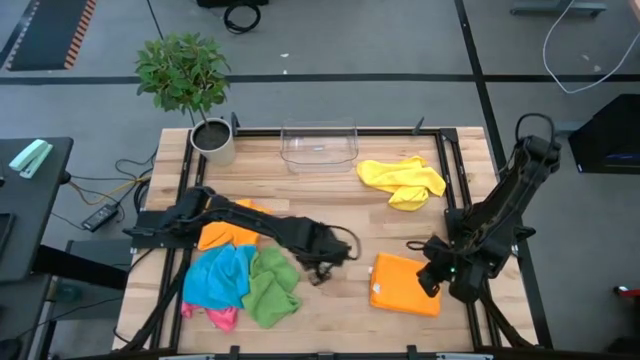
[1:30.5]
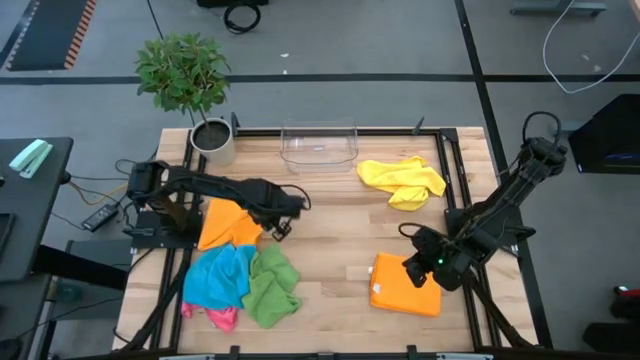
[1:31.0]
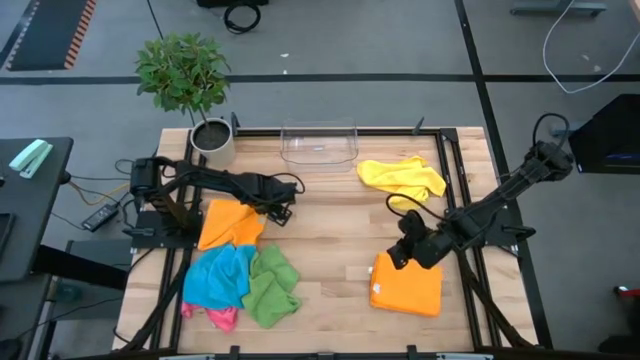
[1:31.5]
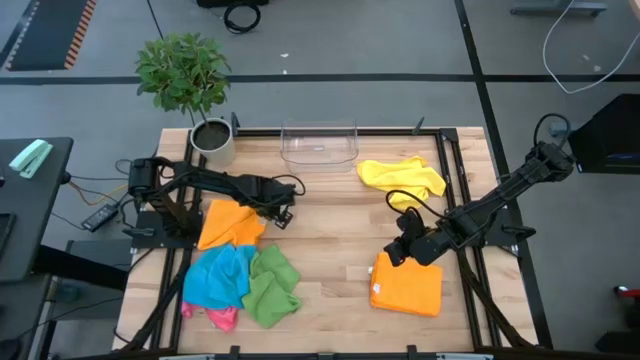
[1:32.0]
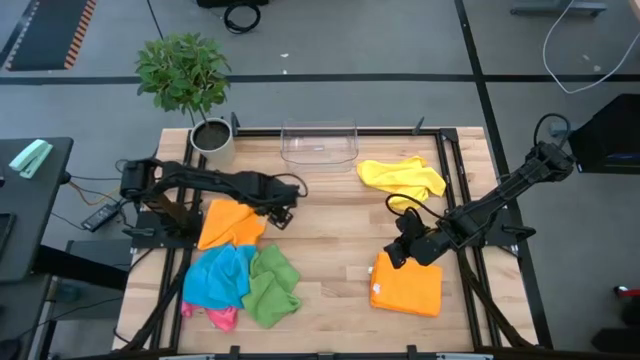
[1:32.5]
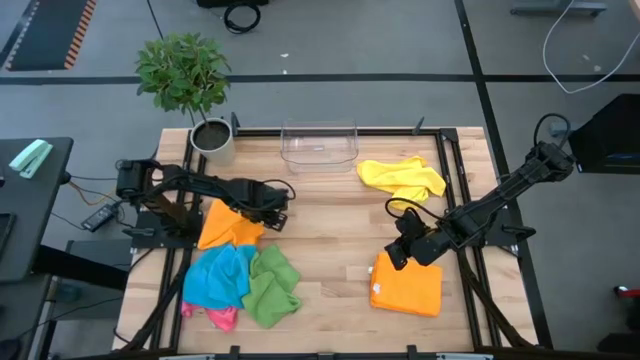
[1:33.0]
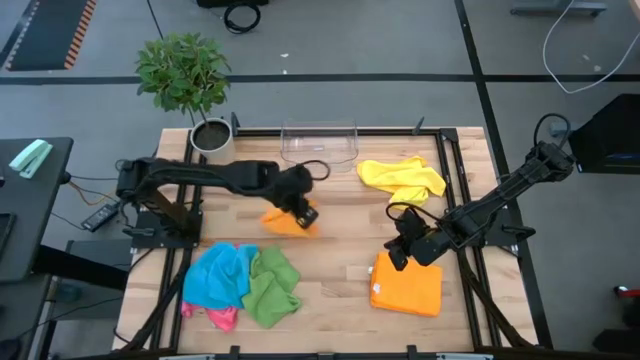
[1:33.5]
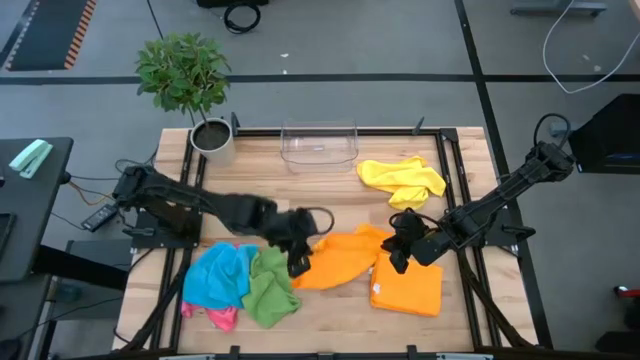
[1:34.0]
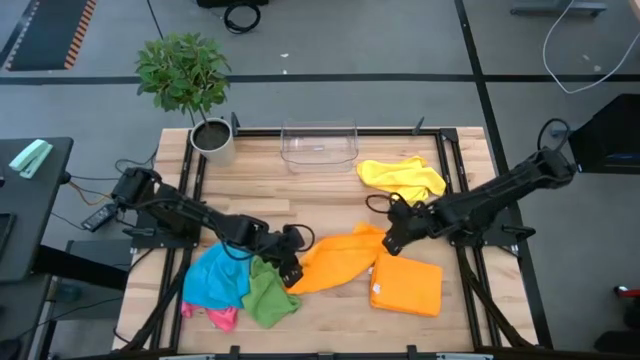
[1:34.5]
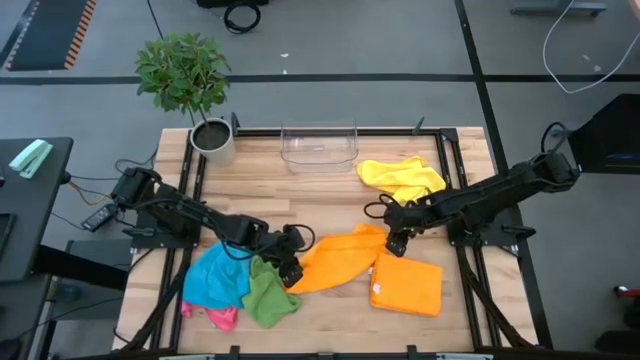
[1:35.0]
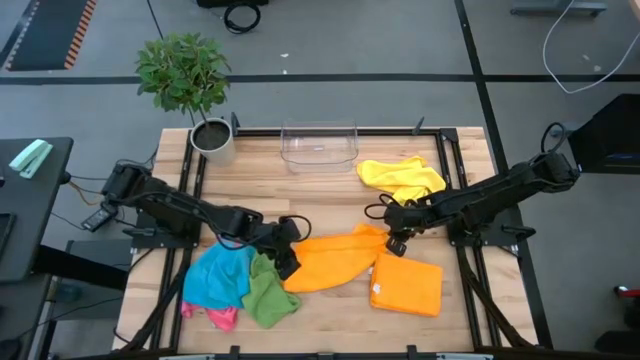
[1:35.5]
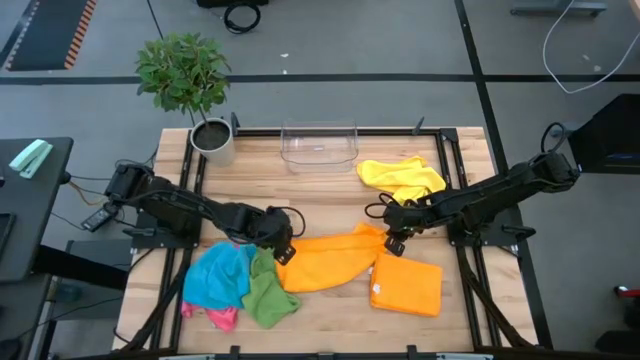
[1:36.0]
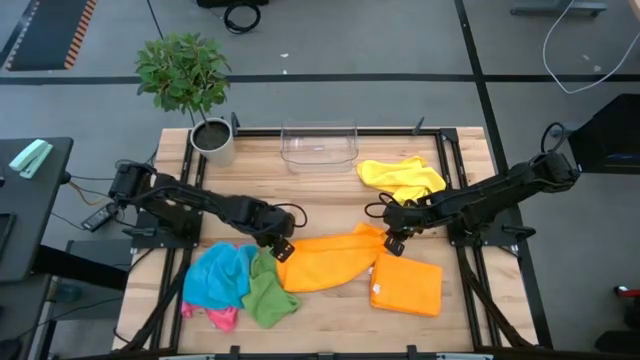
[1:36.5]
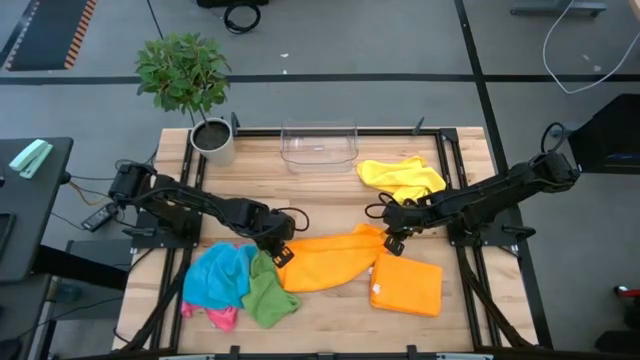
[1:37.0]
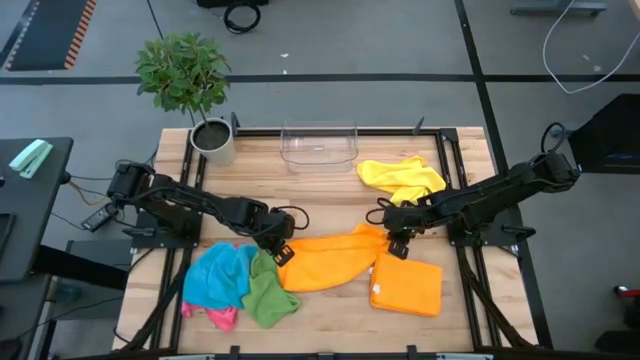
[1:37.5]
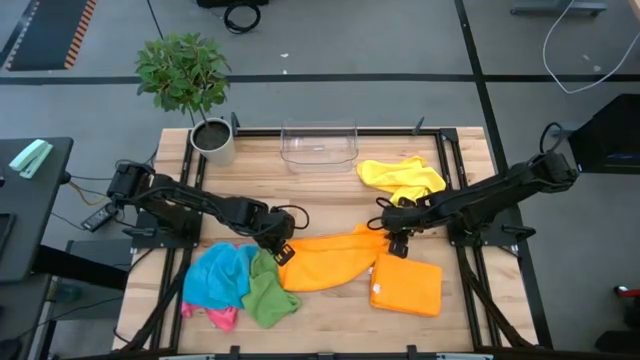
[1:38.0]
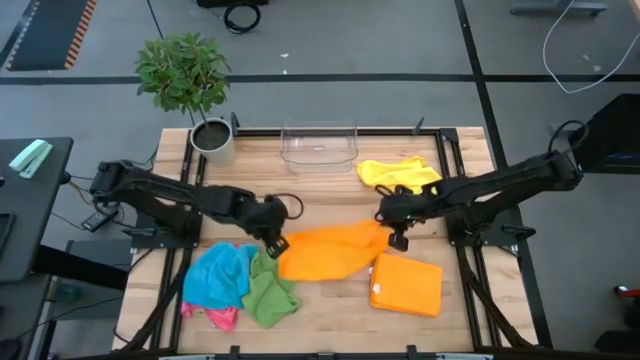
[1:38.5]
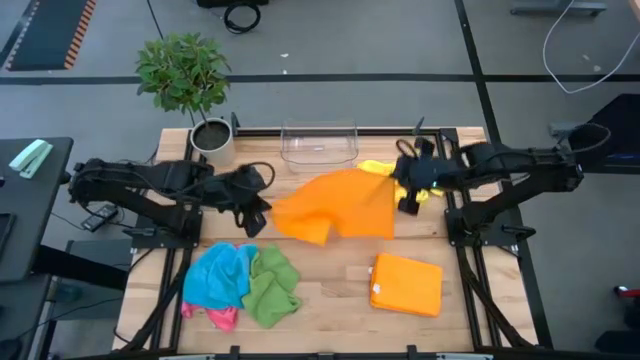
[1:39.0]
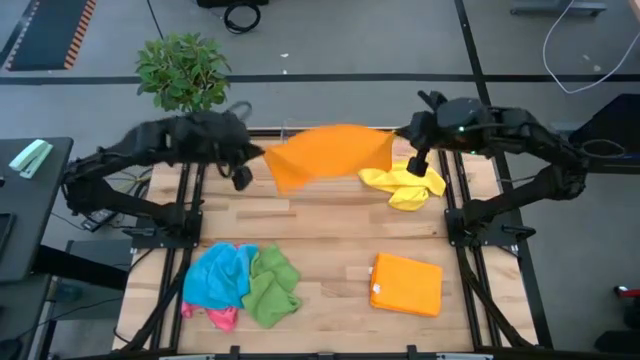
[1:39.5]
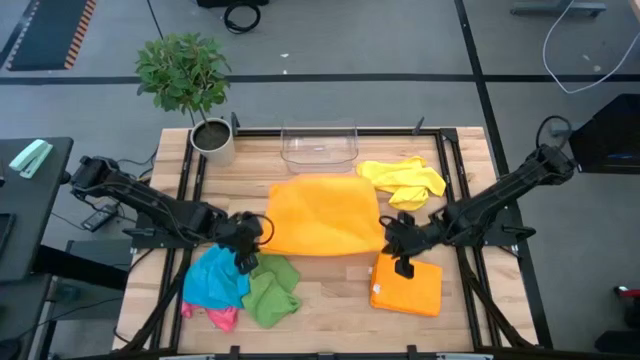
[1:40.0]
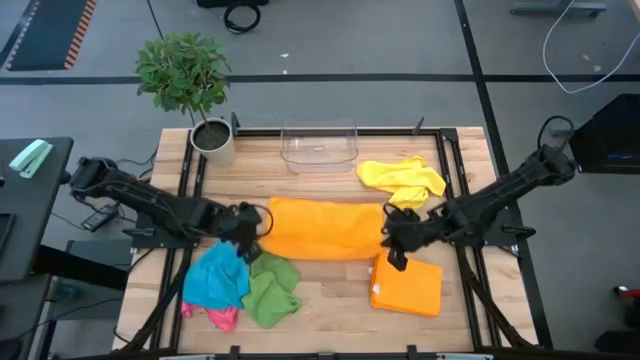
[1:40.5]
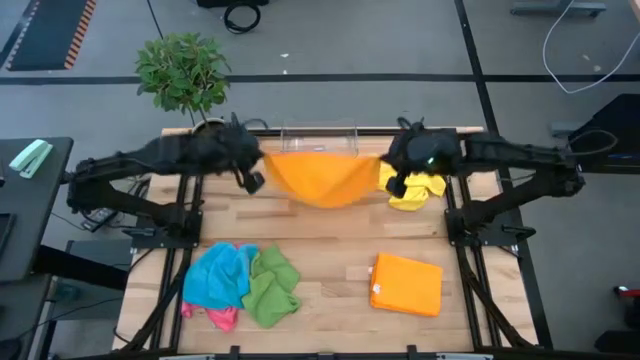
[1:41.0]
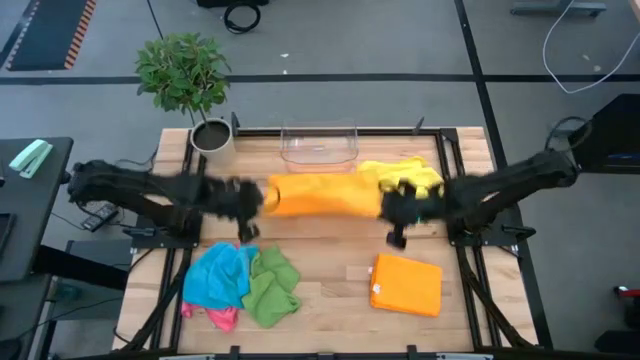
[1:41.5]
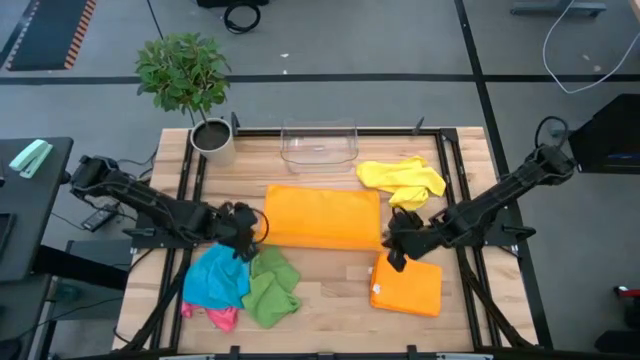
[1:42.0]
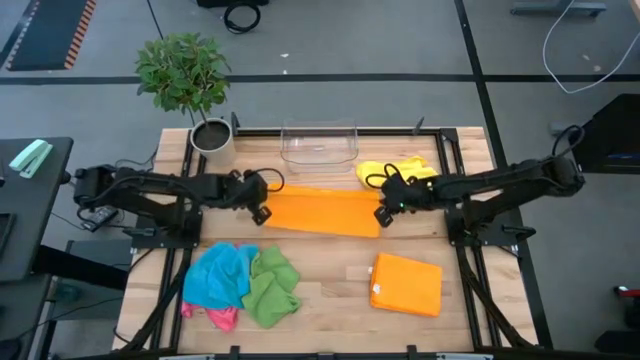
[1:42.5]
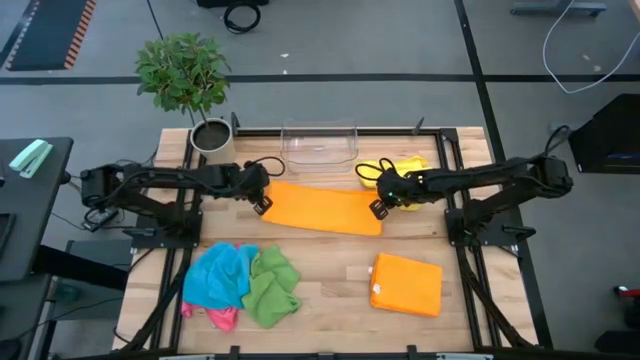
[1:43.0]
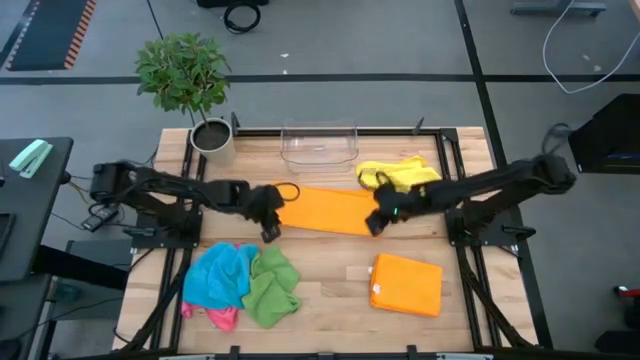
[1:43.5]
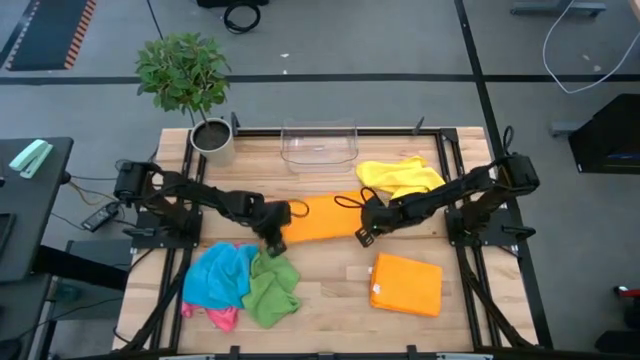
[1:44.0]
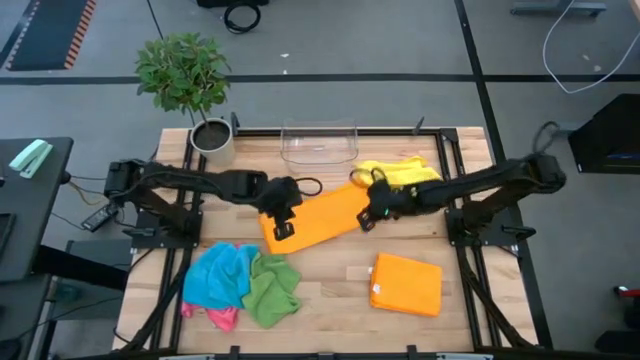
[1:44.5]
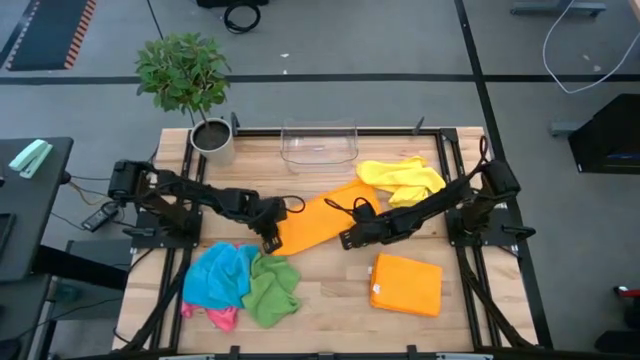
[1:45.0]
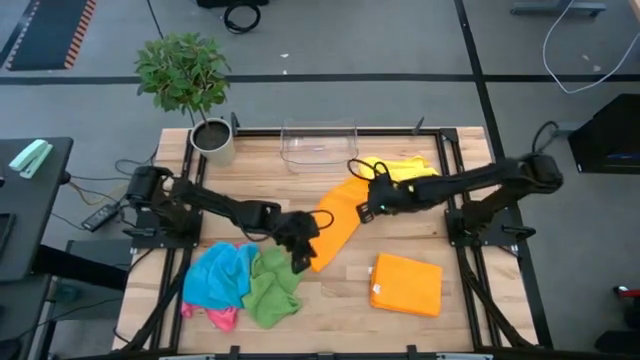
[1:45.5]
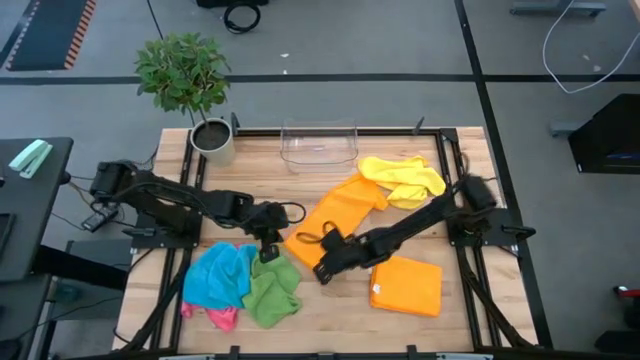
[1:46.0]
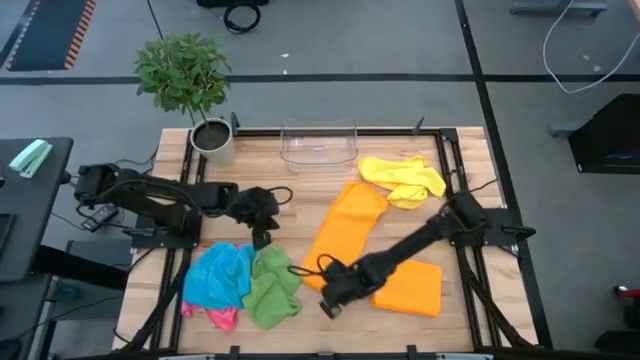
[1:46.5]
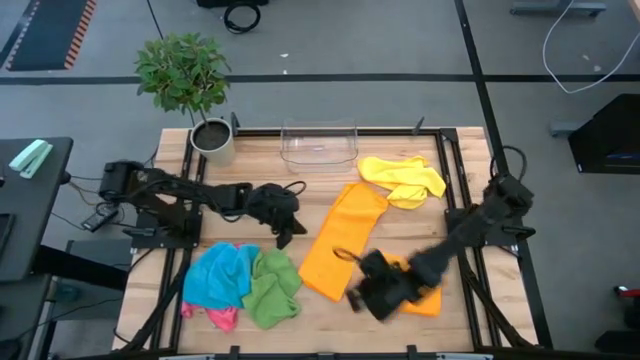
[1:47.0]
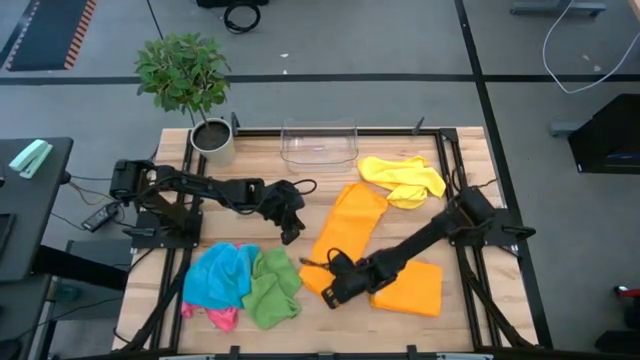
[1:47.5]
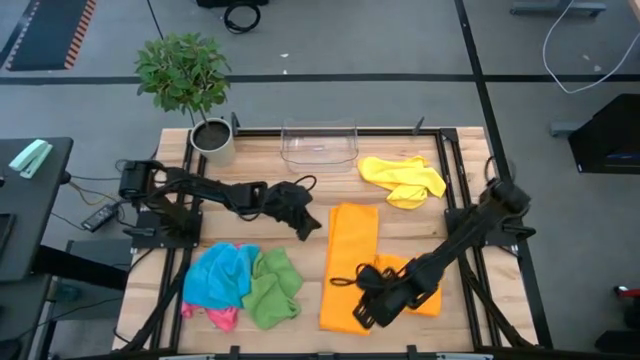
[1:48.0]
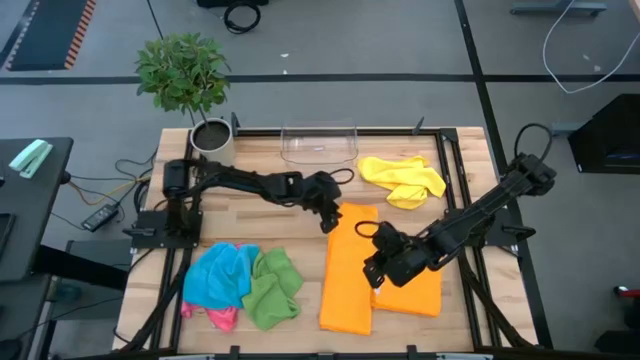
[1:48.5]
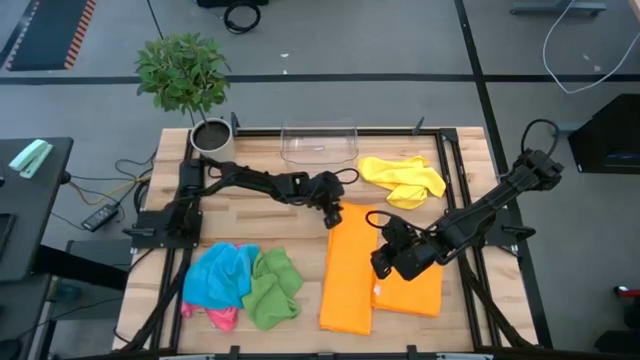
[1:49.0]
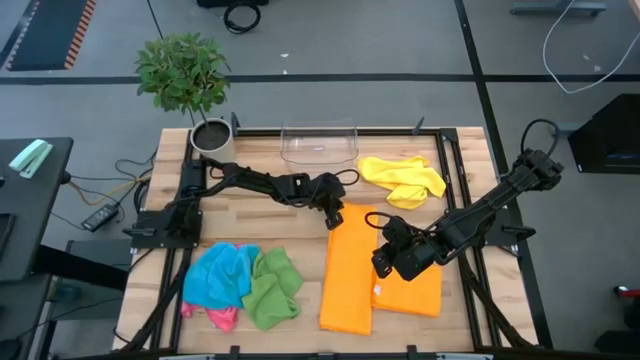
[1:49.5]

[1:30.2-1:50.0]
Task: Fold microfiber towels
Fold the orange towel on the table
